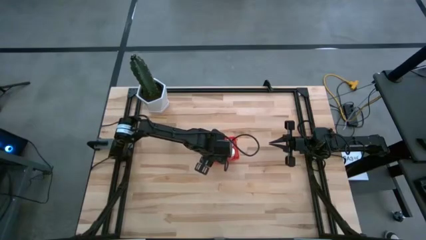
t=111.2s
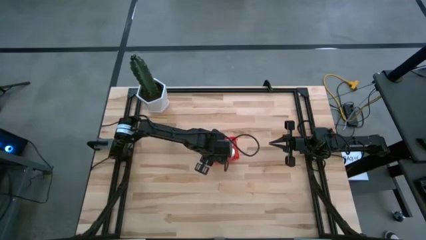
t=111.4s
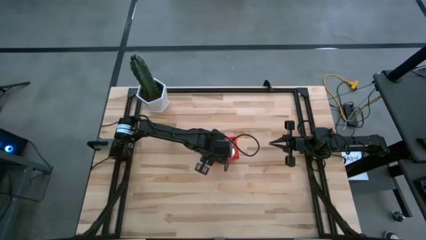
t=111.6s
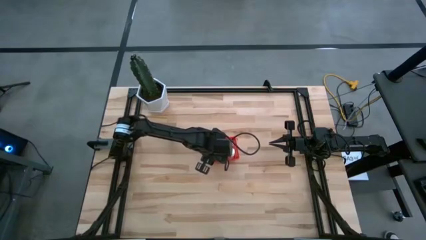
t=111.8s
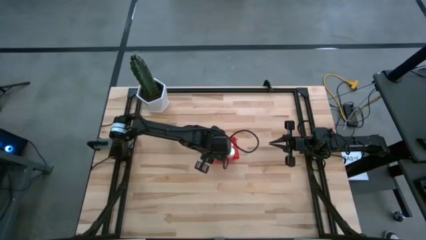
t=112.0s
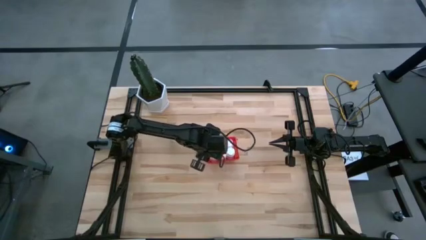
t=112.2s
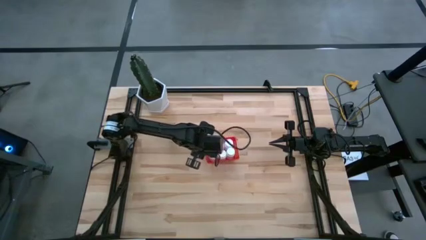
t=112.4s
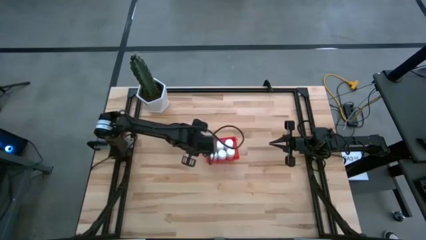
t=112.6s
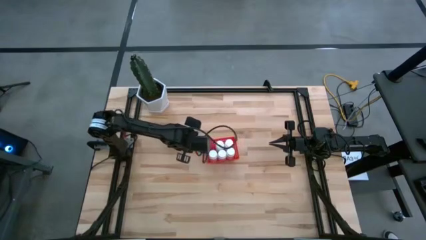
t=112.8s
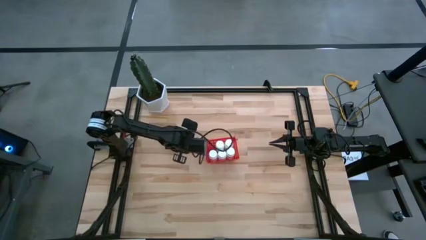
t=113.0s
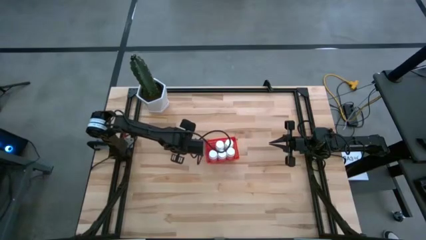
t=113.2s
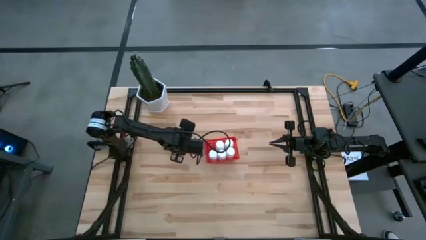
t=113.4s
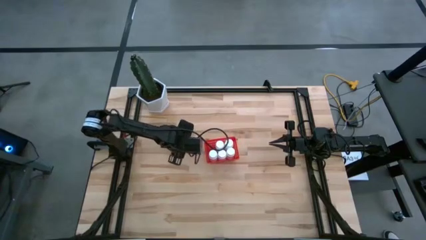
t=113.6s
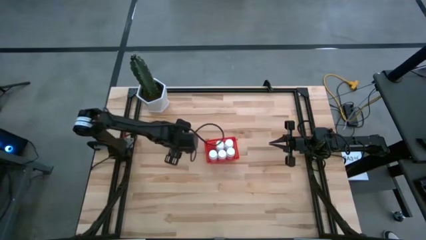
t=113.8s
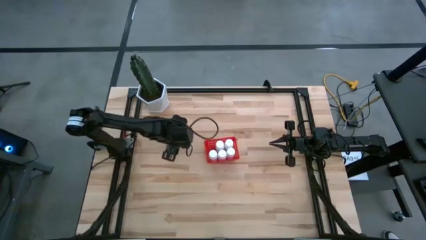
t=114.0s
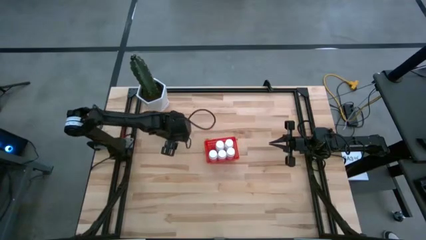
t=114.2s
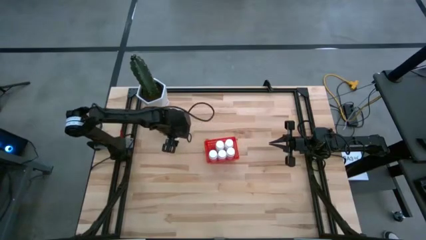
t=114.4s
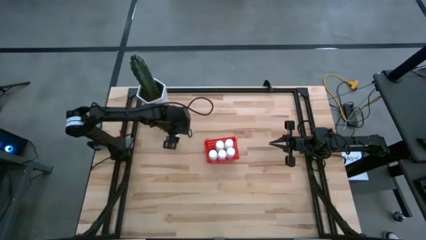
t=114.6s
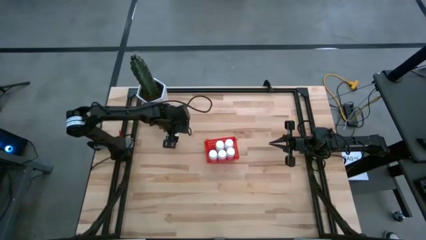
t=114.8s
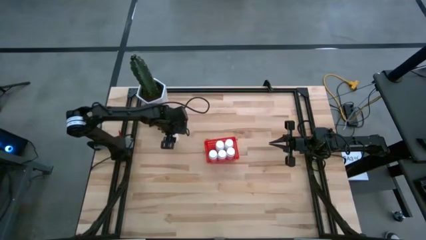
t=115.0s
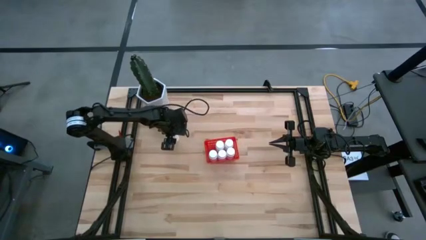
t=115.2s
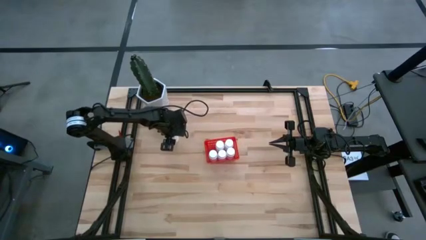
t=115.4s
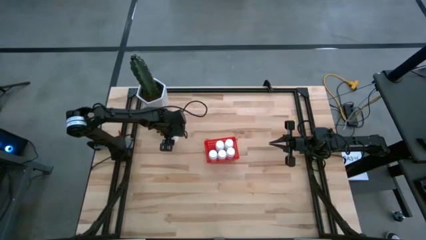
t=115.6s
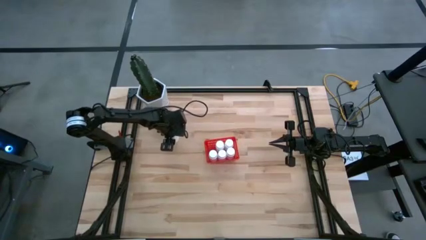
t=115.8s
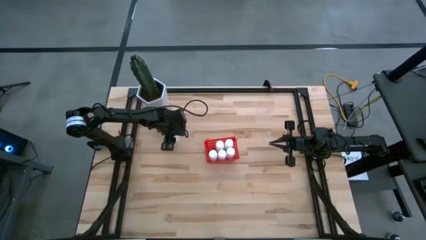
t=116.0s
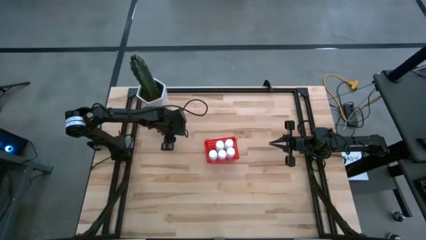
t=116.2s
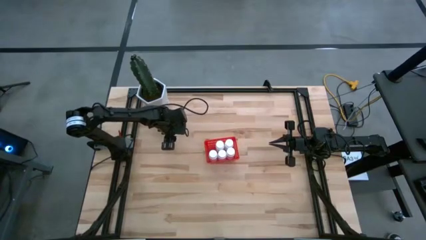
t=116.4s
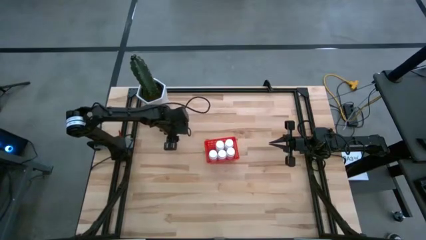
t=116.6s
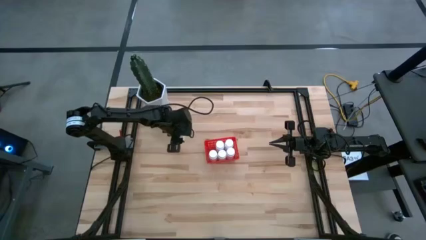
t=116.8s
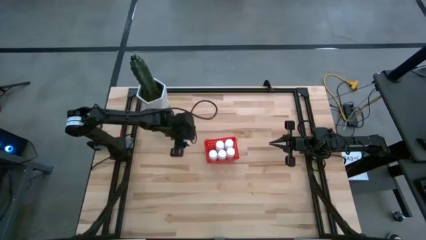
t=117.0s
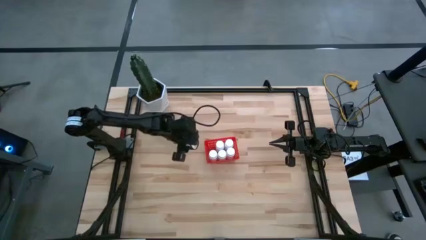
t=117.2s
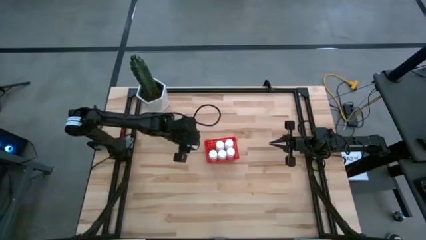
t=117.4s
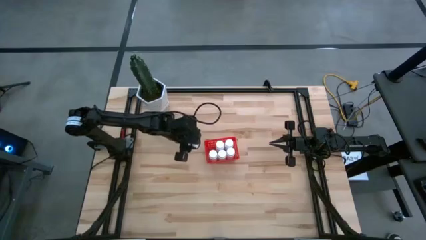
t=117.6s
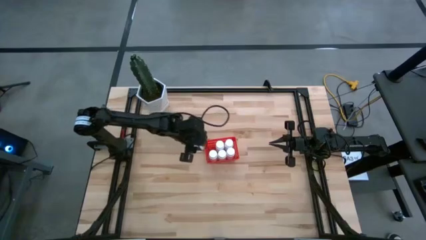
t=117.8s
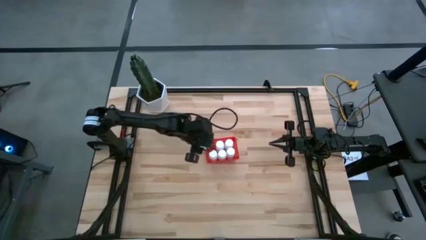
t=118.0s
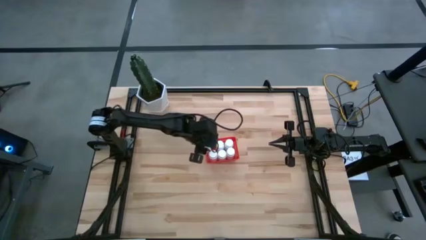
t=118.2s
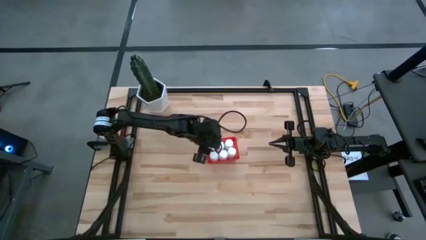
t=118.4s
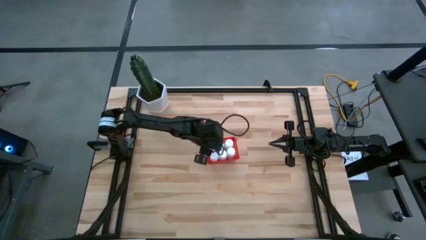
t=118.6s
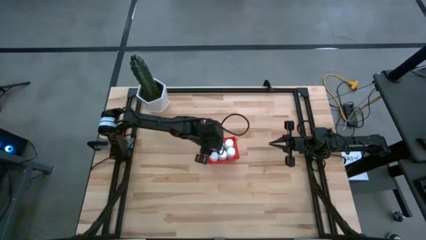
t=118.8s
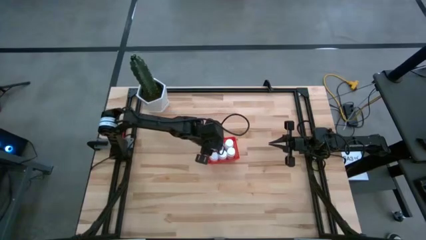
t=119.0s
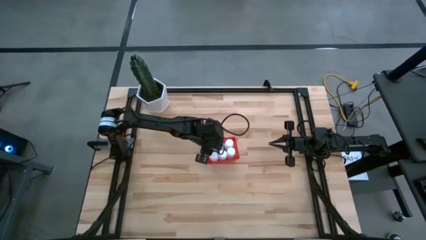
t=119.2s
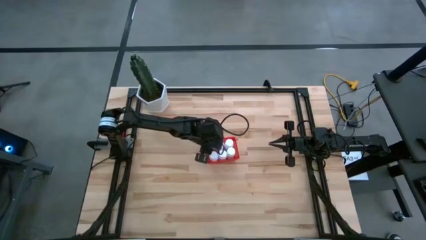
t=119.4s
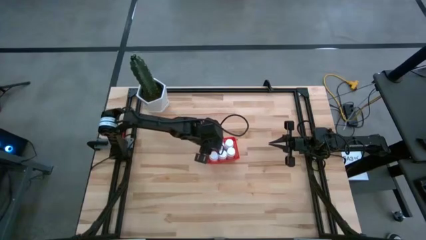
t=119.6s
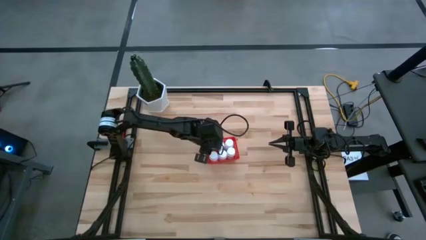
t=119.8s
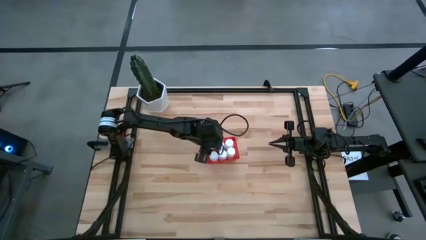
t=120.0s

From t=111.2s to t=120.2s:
Task: Pick and place pill bottles into a basket
Put the white pill bottle into the red bin

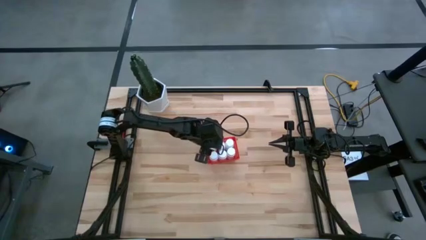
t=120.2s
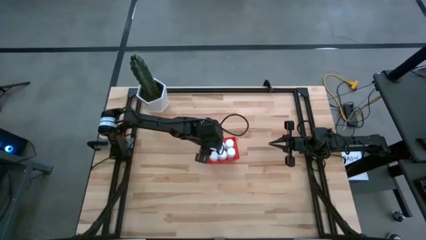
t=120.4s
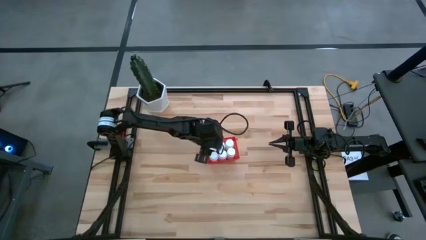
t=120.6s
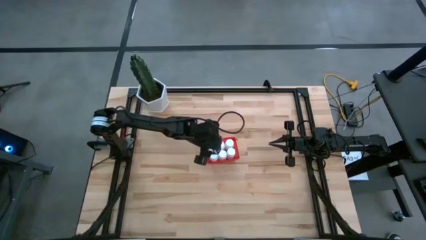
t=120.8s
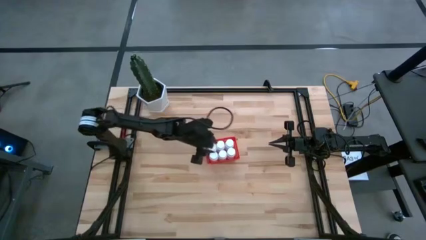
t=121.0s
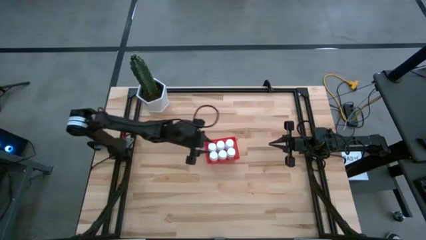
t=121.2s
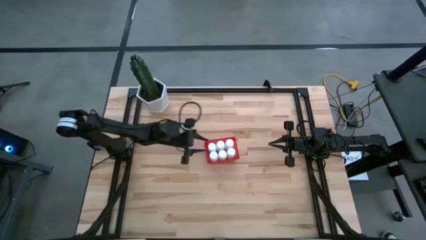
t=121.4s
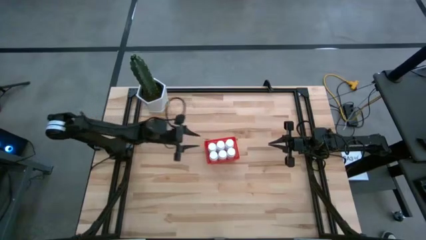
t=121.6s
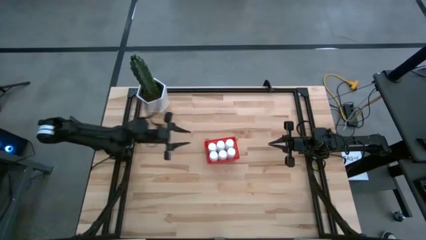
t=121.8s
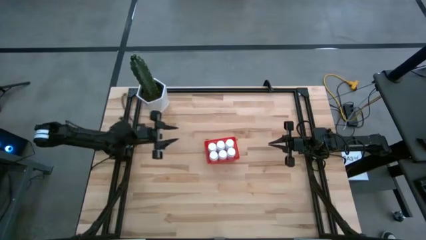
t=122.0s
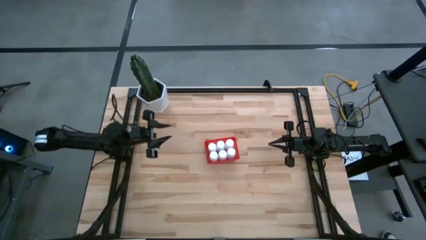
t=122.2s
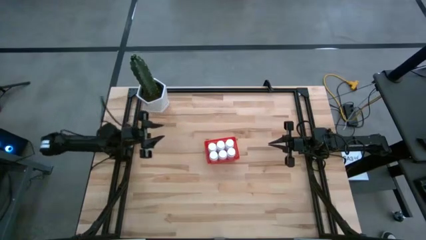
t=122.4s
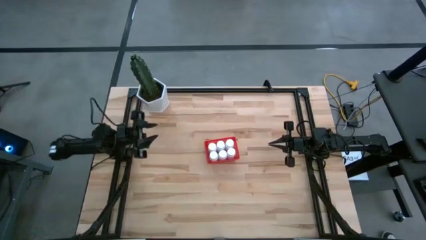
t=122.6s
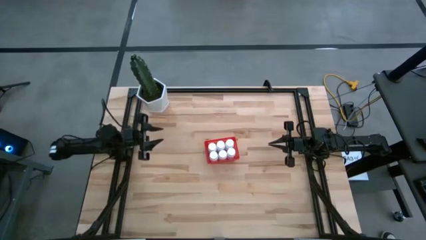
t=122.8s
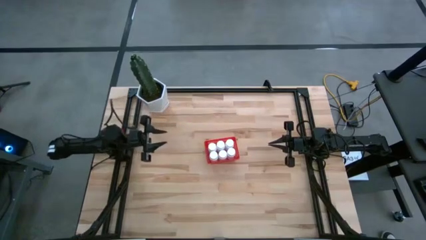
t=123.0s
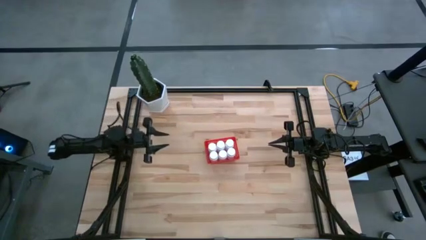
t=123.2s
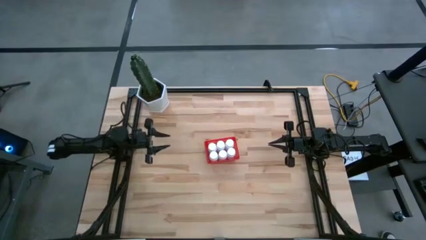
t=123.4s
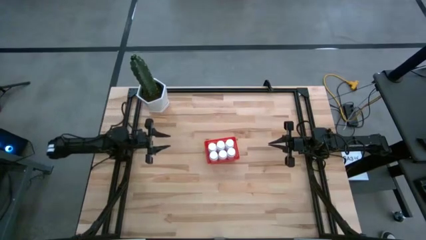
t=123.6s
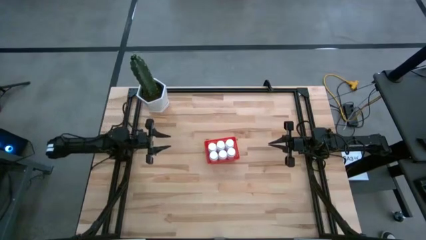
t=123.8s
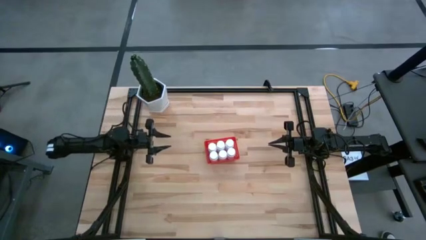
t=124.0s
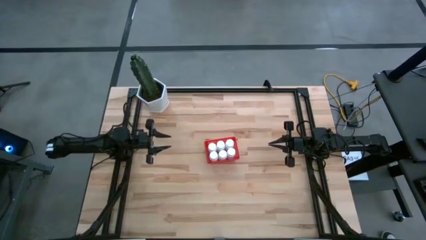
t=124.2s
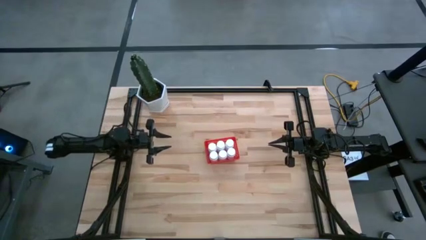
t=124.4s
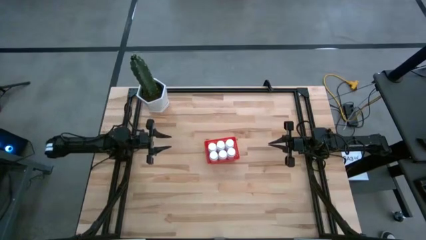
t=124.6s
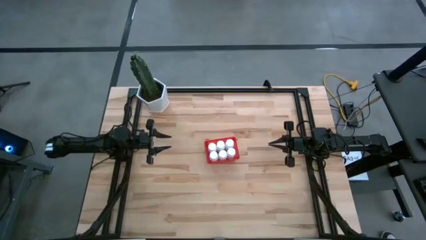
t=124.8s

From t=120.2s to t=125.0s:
Return to Home Position

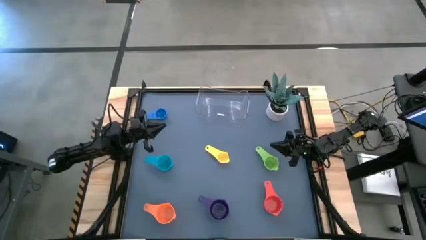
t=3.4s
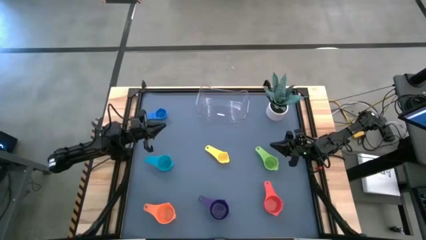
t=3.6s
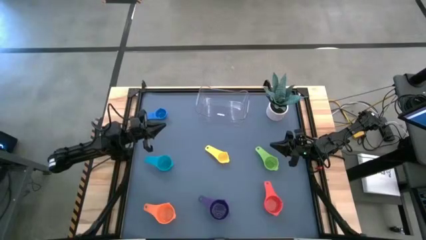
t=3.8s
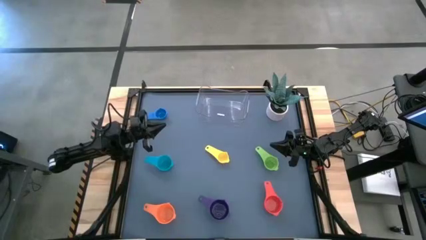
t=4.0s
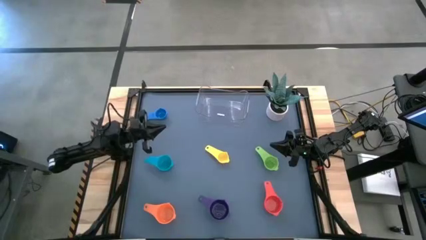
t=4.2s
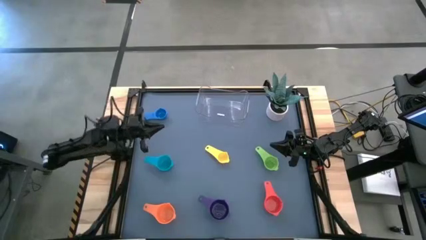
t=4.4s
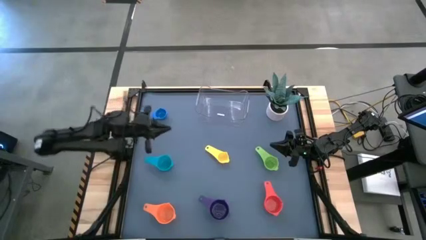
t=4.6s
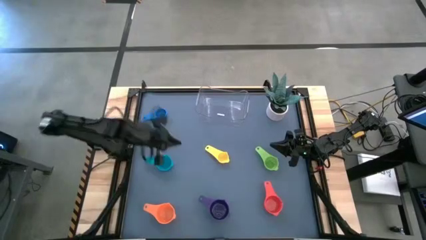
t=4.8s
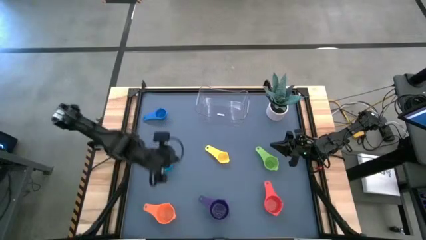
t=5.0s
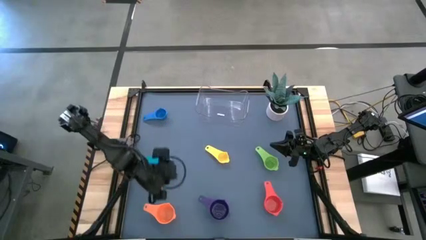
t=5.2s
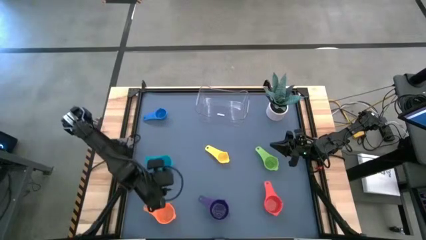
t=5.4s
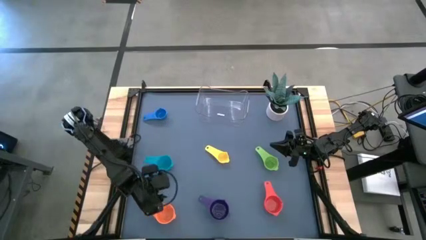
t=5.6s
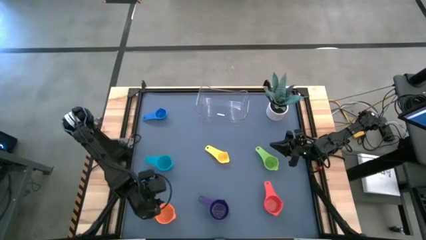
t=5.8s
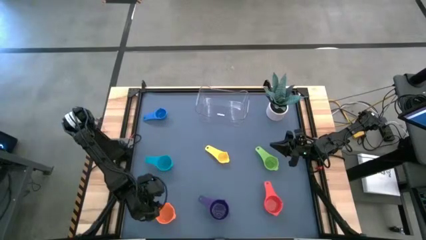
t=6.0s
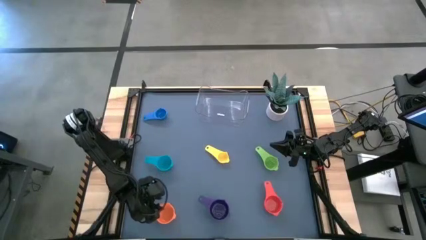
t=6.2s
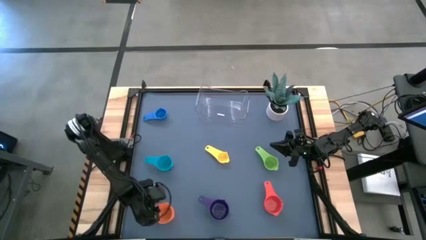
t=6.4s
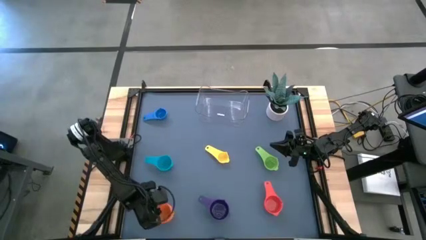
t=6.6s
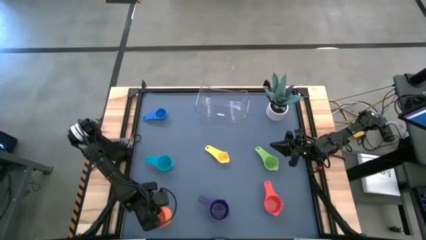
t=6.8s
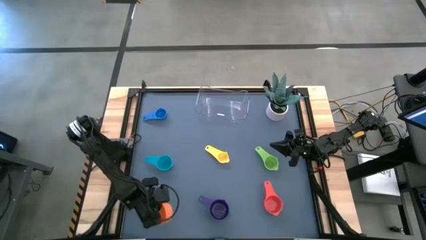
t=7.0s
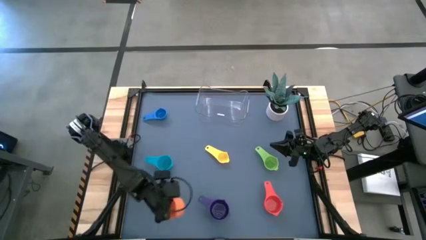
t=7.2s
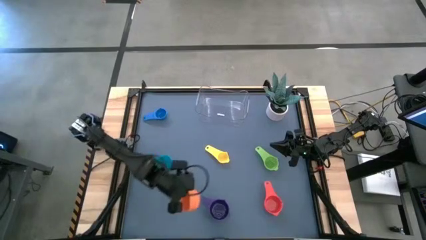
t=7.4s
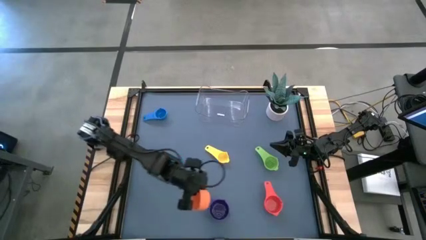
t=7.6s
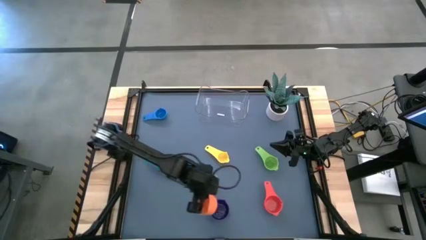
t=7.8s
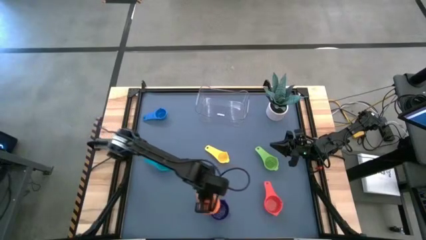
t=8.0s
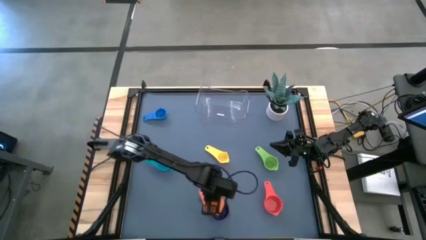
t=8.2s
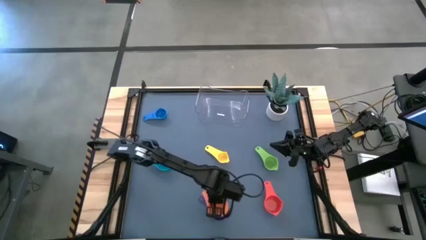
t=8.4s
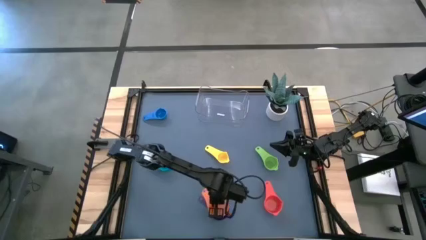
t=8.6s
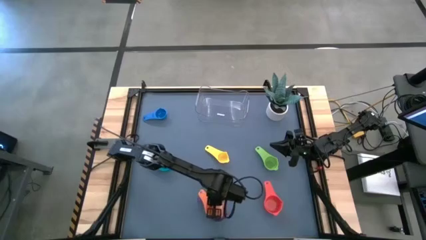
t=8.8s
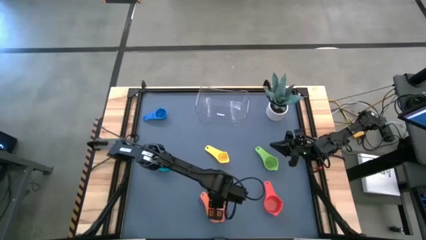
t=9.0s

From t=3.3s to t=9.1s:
Task: Nest measuring cups in basket
Stack the orange measuring cup on top of the violet measuring cup
